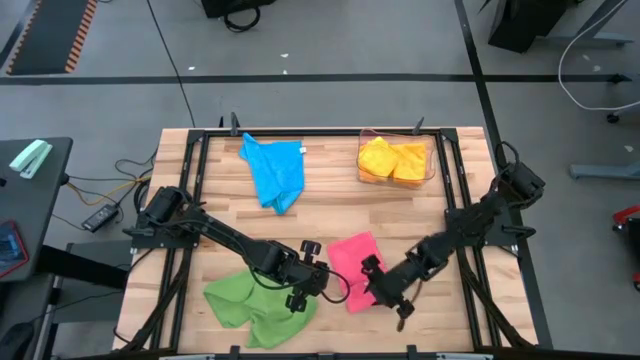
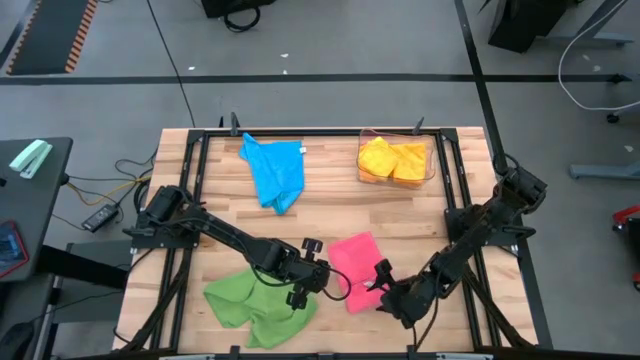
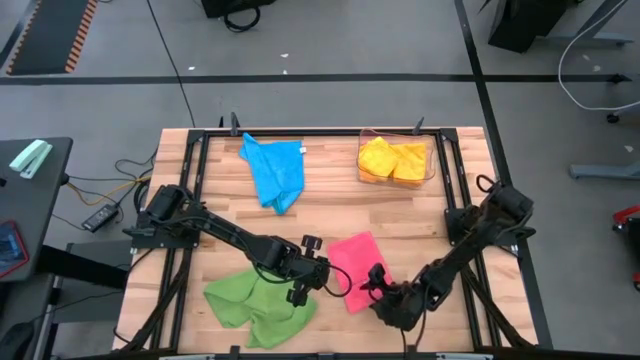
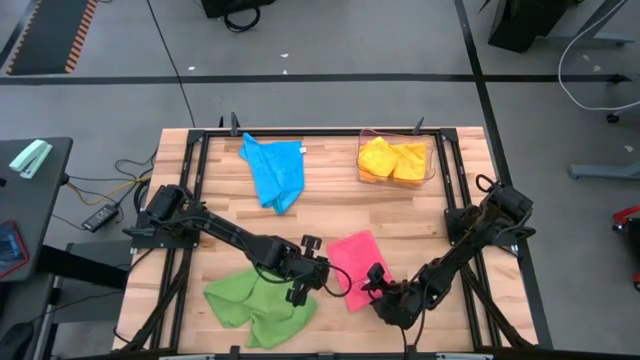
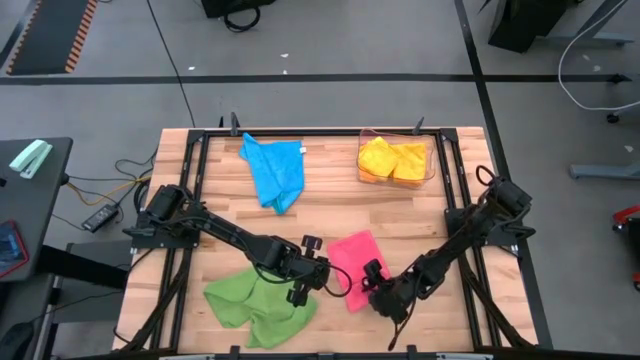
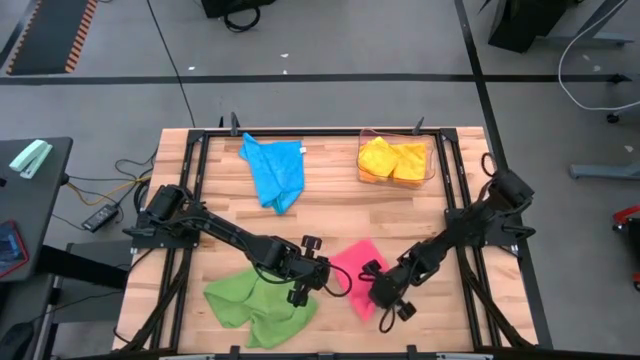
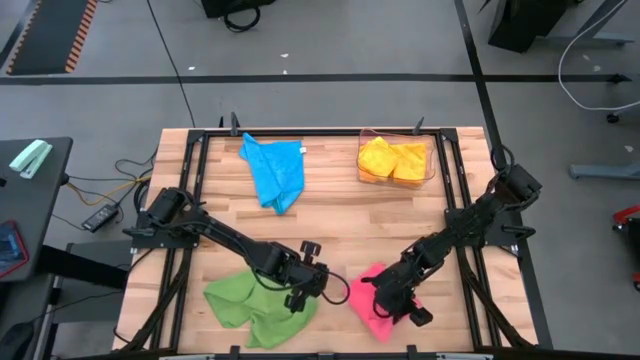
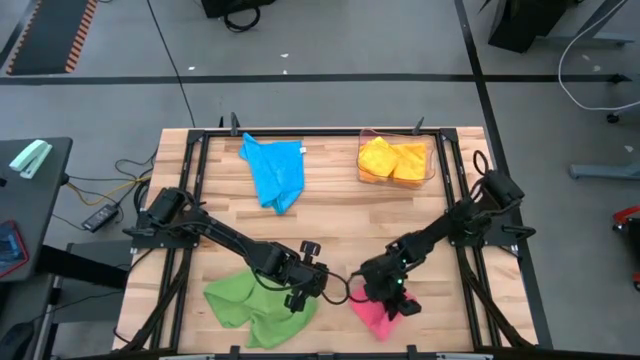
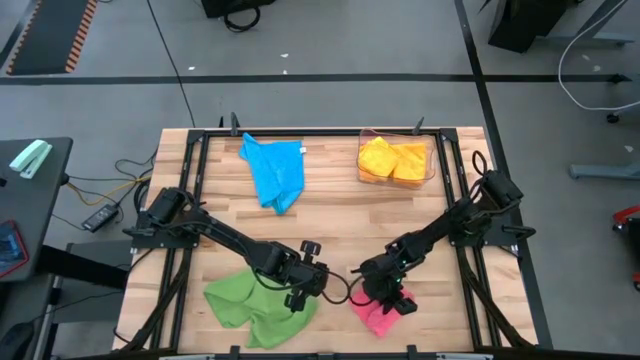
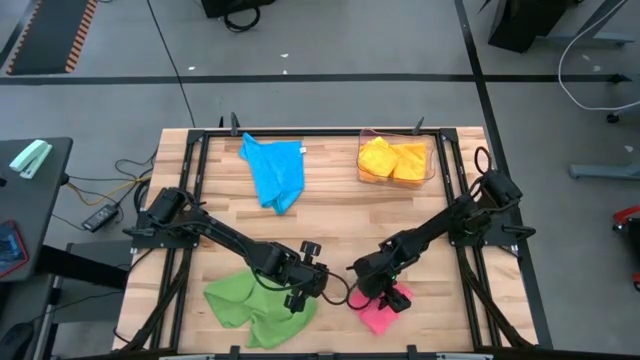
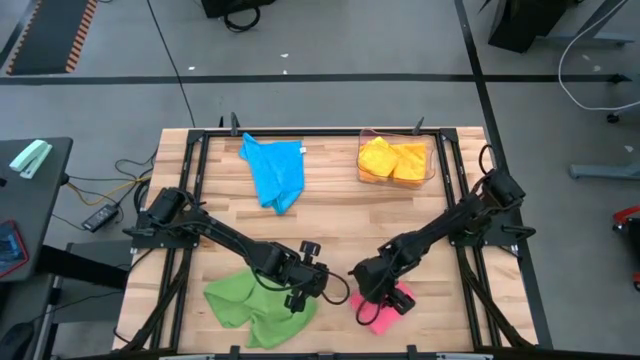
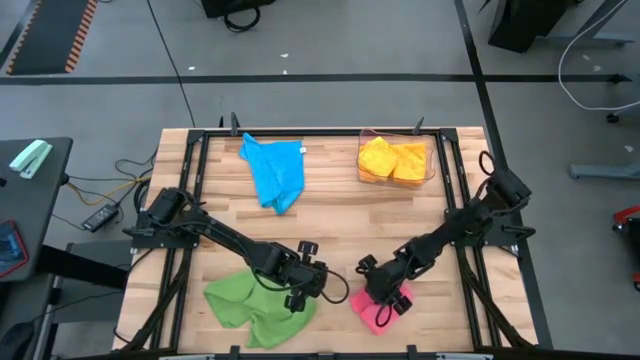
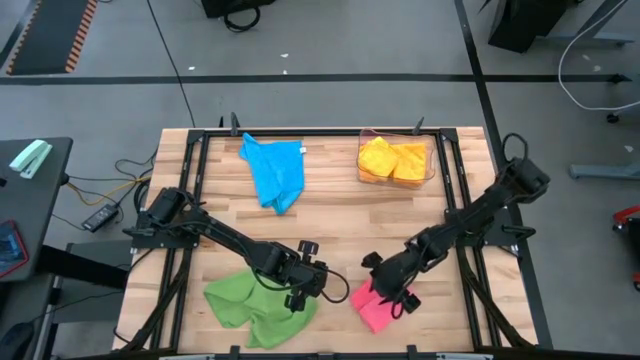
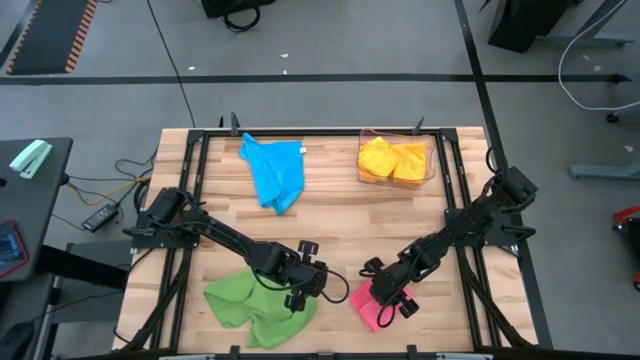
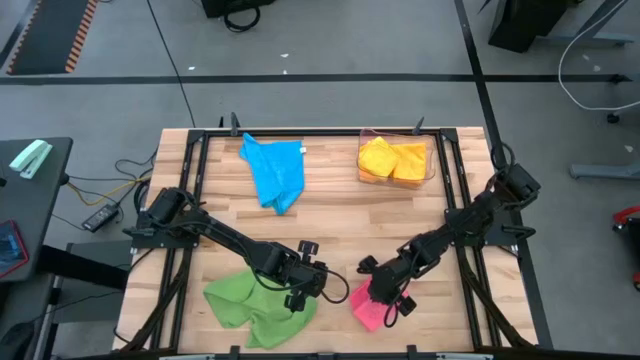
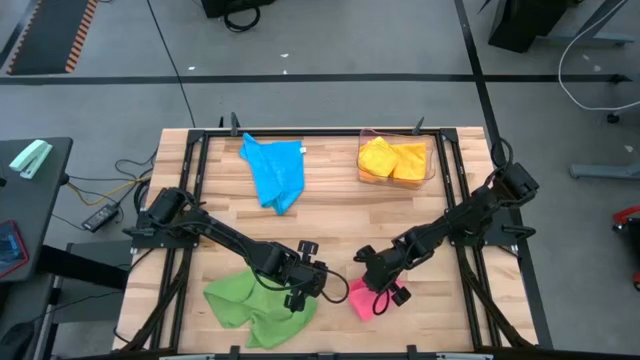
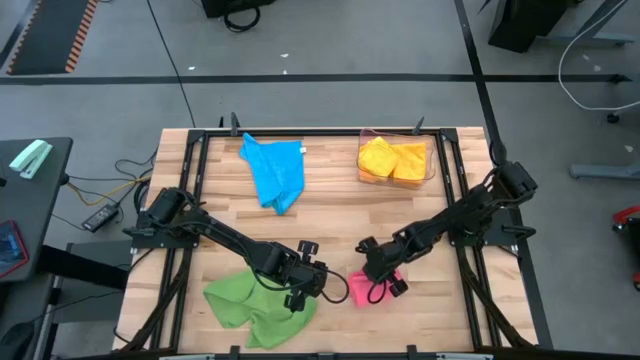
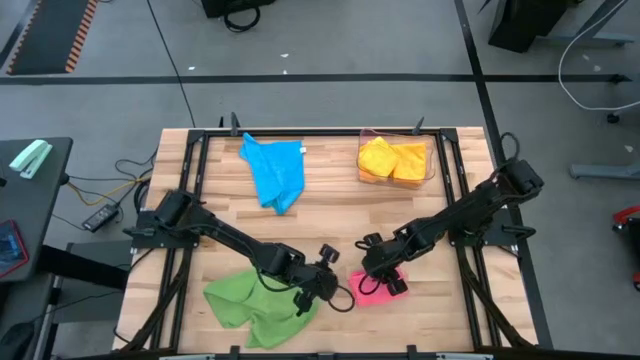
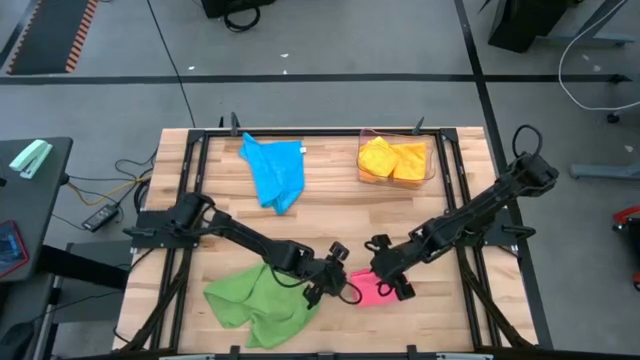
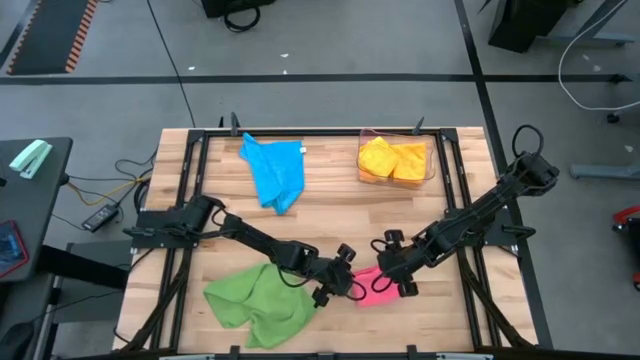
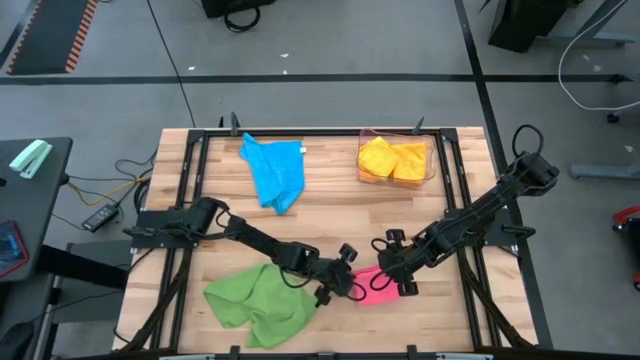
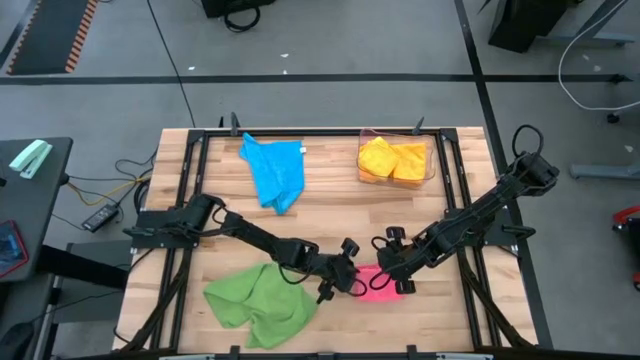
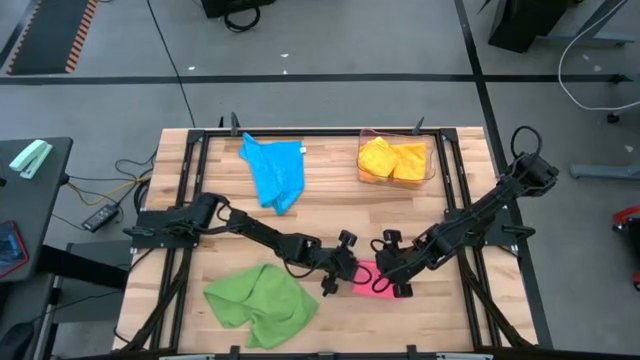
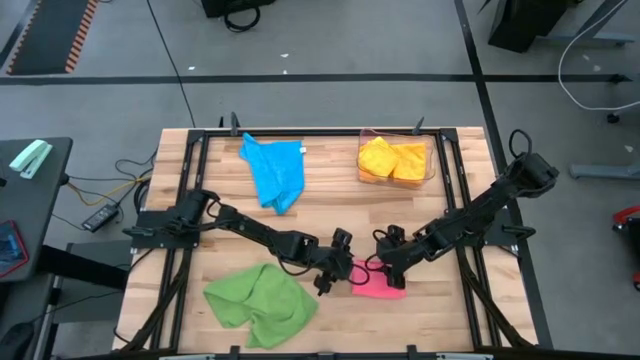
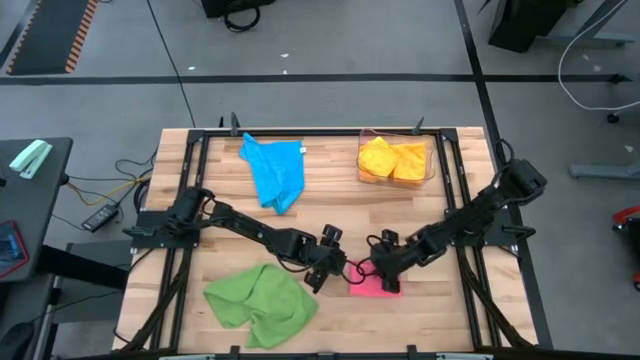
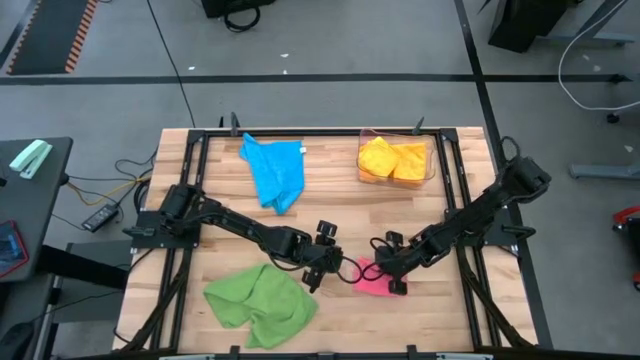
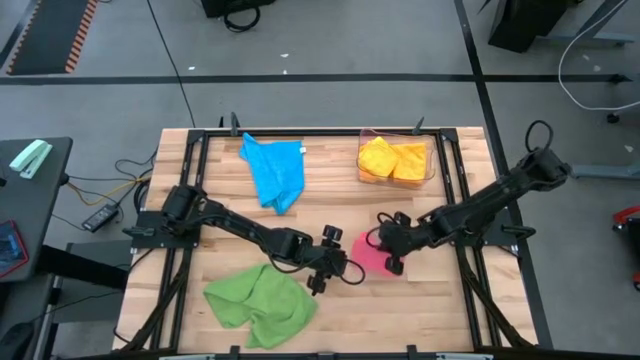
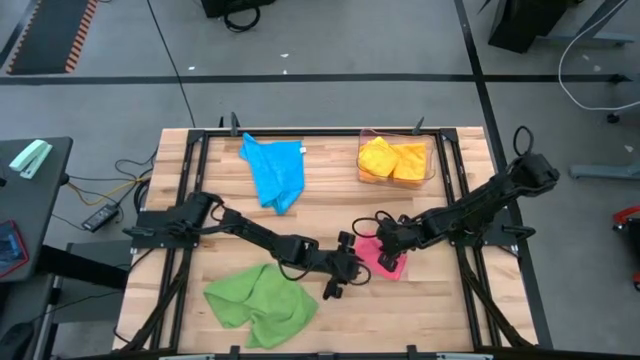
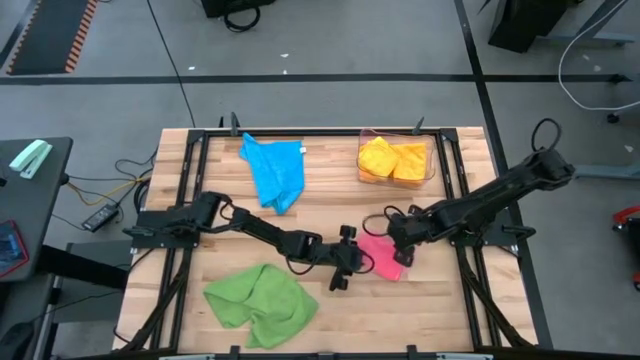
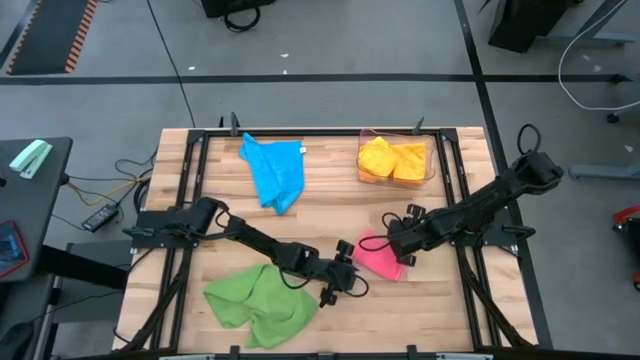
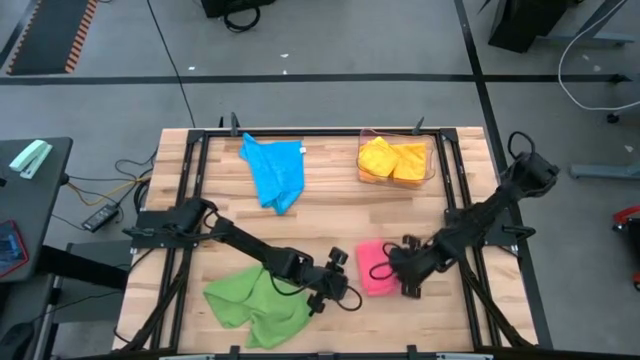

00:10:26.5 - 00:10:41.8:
Task: Fold microfiber towels
Fold the pink microfiber cloth
